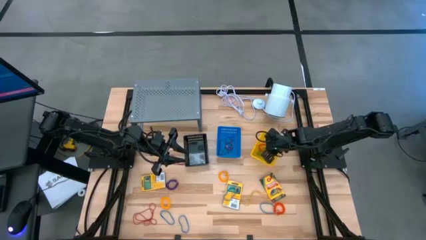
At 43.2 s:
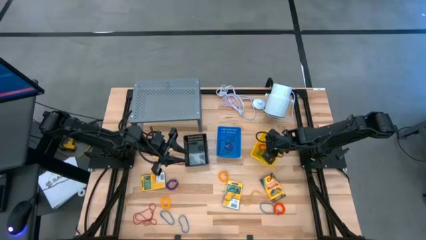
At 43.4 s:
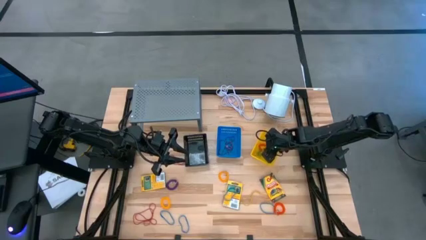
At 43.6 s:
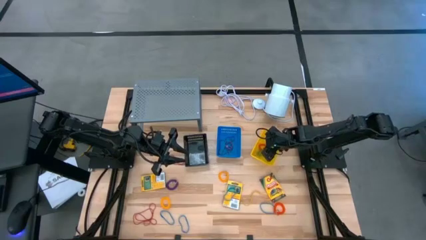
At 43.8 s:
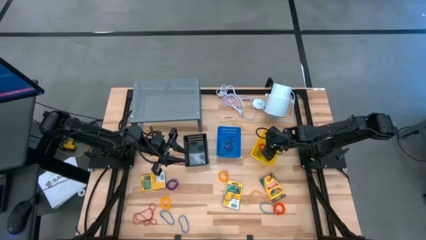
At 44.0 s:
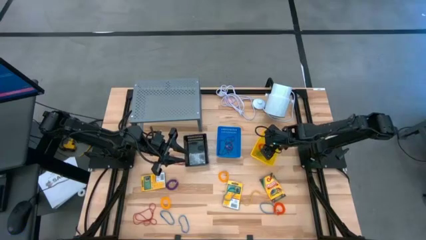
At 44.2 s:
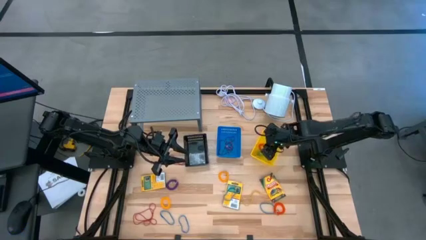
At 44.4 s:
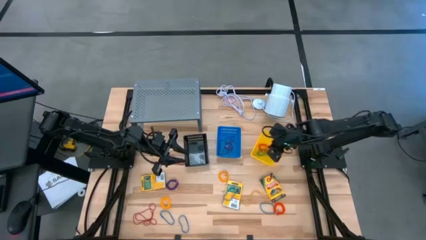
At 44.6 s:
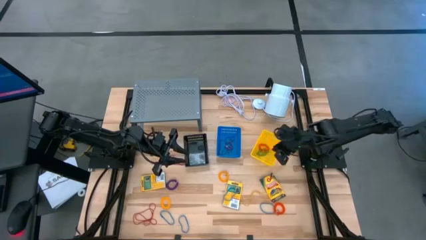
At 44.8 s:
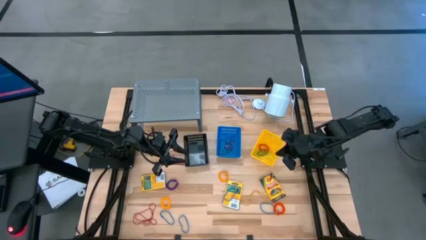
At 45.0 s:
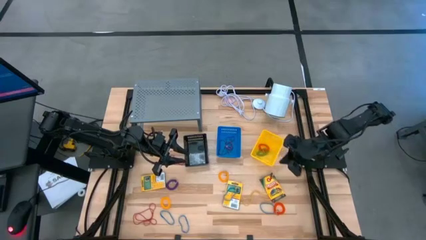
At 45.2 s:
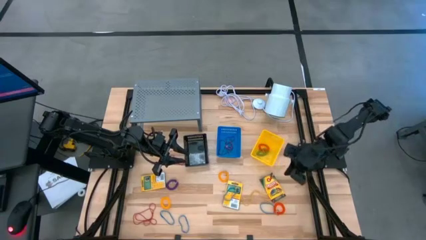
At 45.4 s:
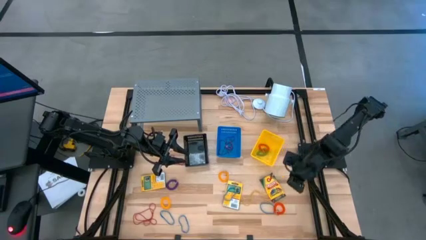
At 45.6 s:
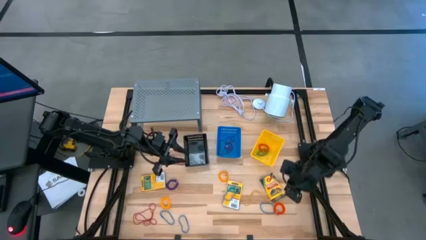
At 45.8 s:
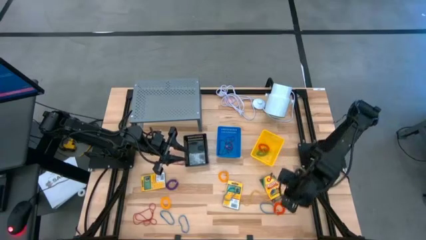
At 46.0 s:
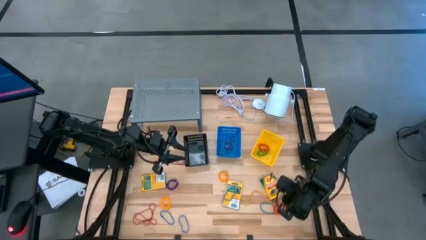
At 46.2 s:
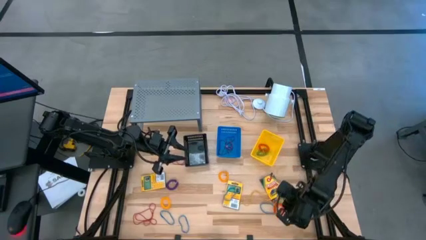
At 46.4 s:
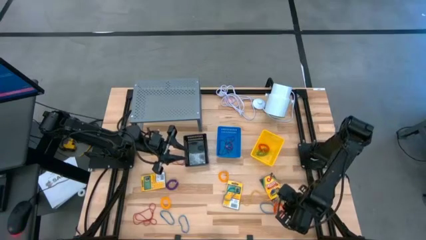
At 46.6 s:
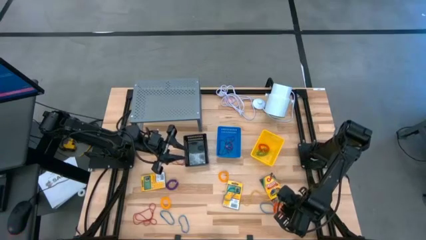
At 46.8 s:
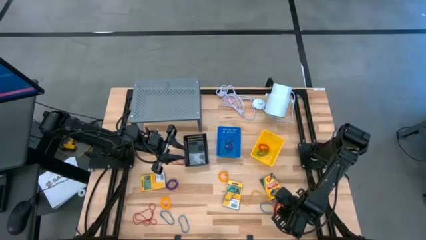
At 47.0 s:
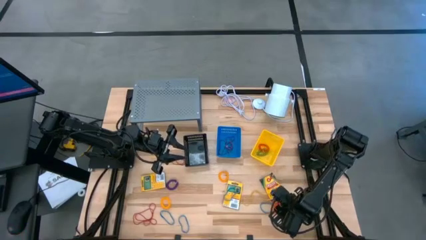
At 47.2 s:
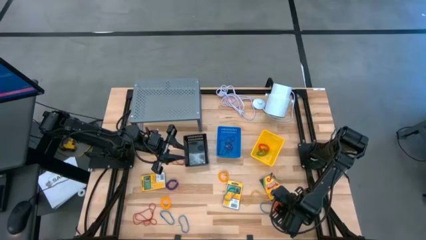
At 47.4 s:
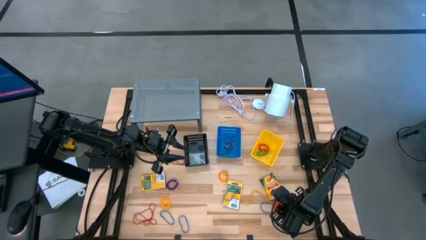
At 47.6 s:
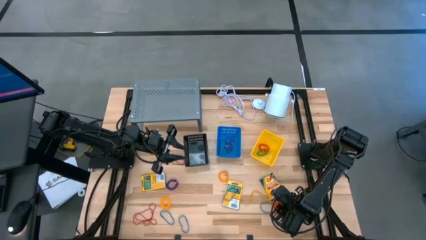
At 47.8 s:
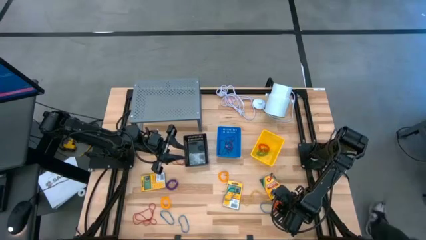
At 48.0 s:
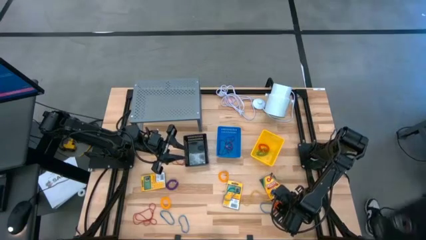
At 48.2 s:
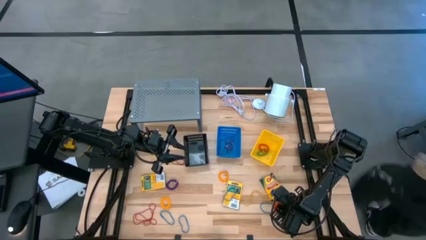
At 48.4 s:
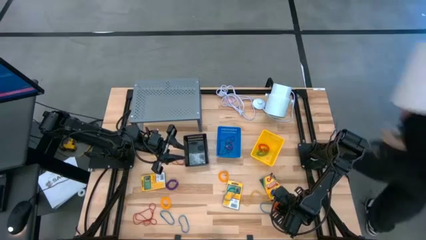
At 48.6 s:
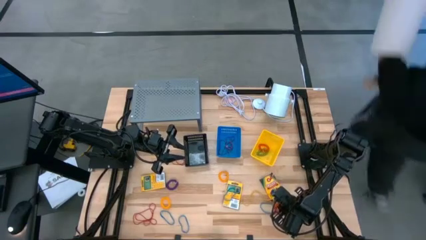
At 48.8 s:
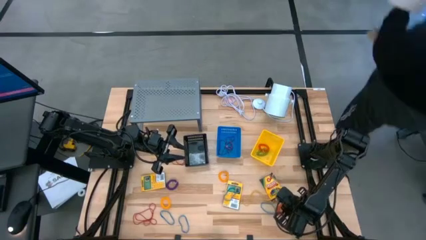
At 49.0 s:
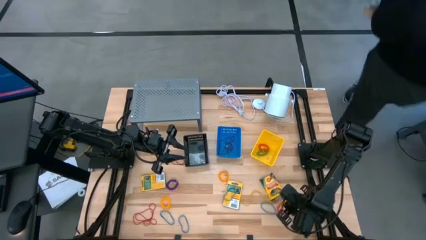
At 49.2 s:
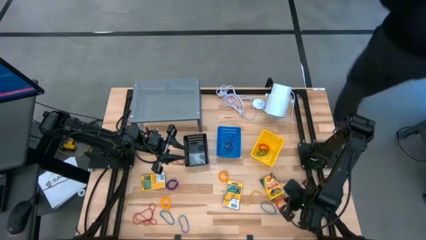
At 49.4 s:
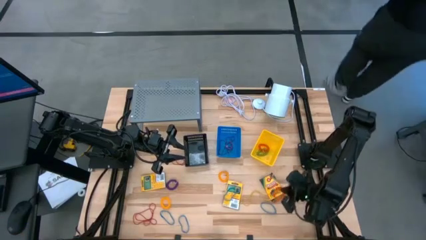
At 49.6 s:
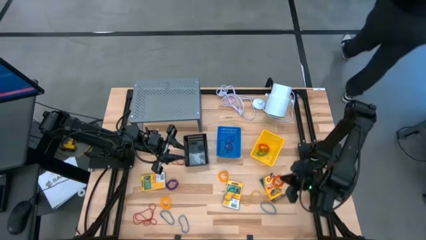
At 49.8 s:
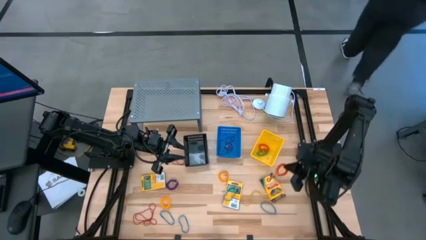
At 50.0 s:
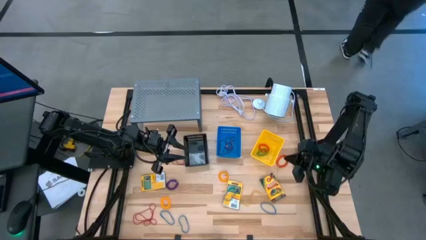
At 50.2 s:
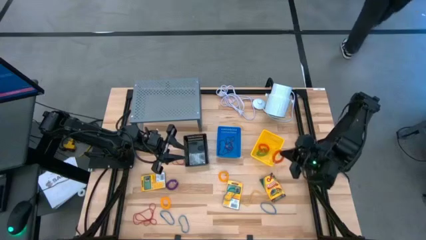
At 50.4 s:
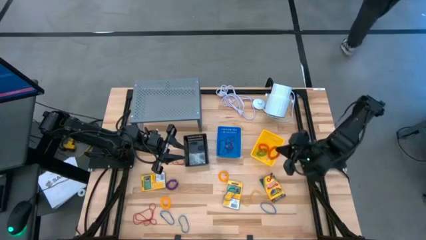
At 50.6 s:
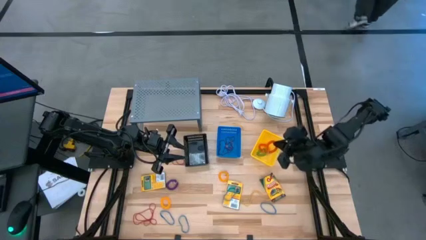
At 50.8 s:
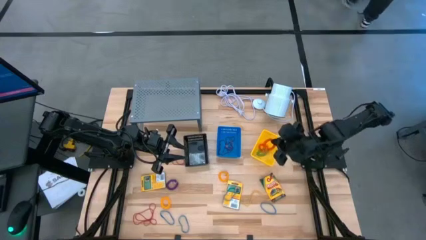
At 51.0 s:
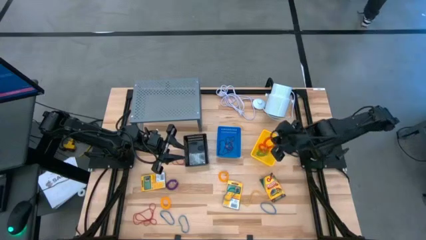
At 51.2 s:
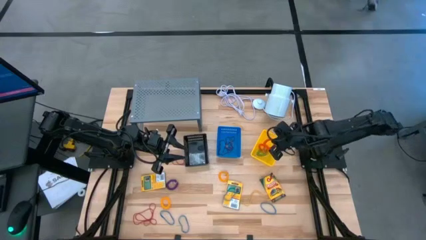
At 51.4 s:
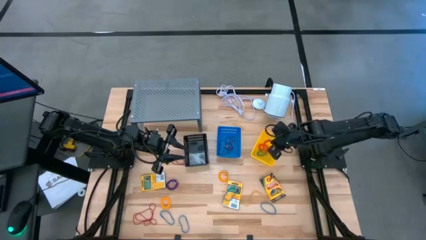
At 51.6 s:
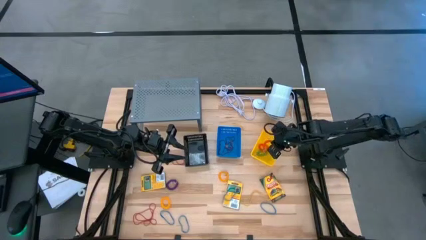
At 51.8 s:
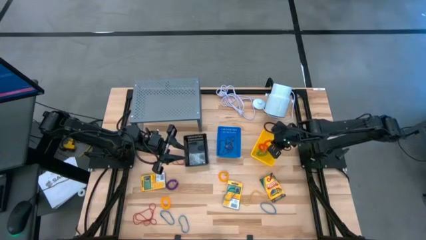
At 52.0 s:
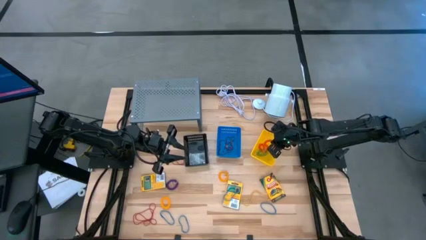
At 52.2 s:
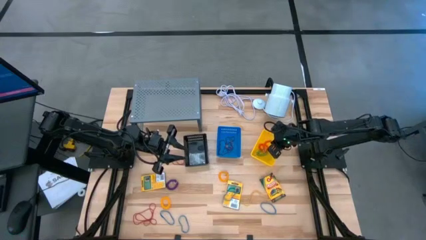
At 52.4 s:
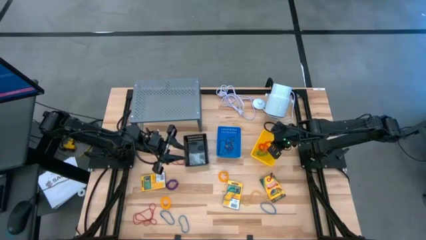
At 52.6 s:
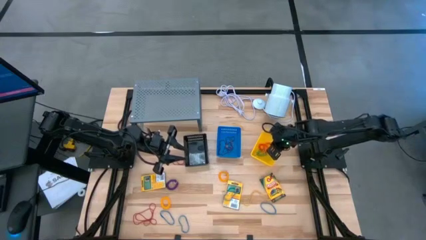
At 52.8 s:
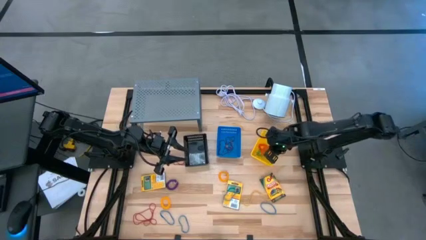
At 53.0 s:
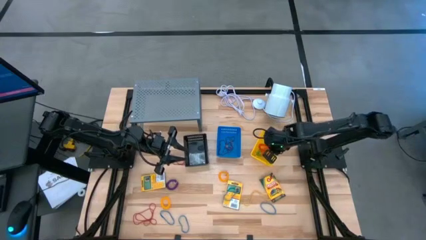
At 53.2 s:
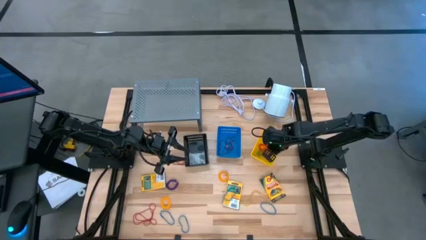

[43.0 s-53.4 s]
Task: Pick & Place Office Desk Supplies
Put the orange stretchable key holder into the yellow basket
